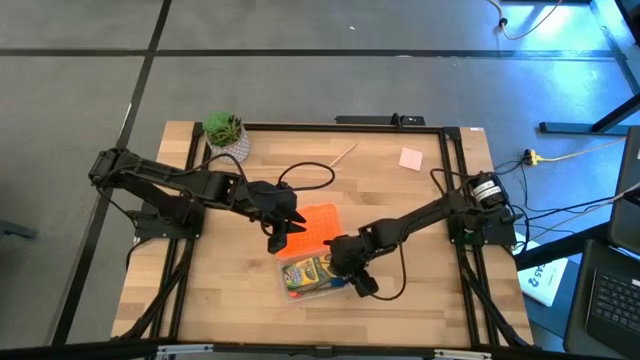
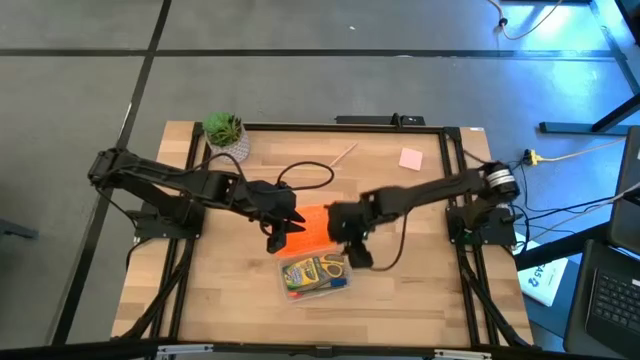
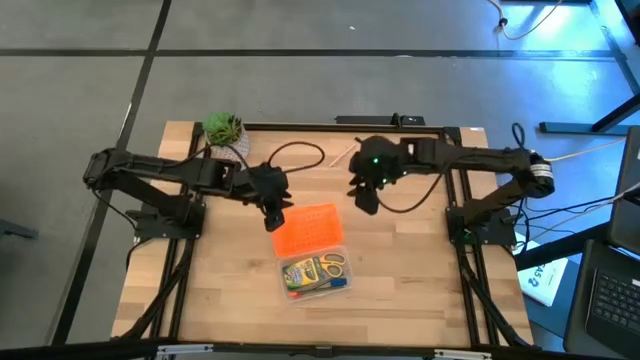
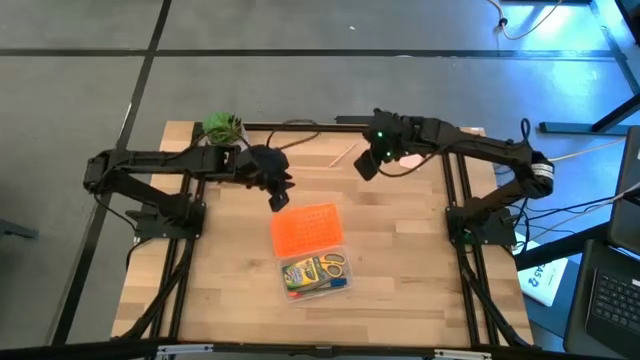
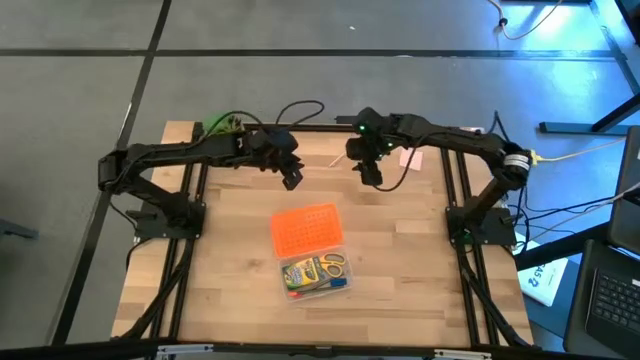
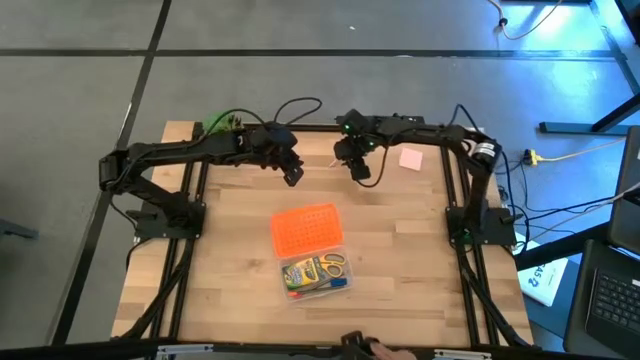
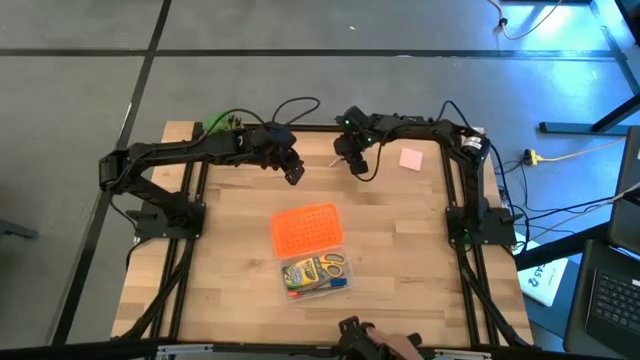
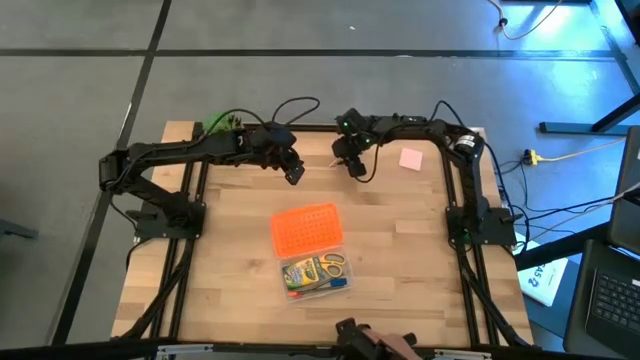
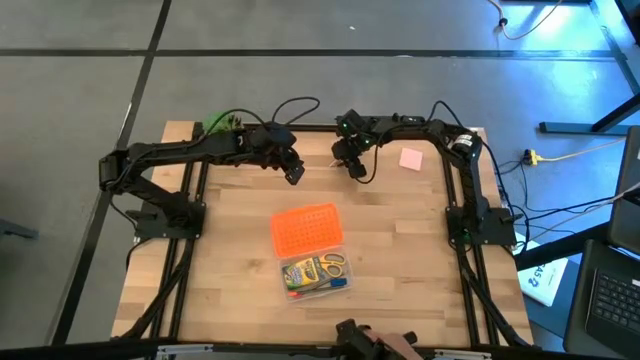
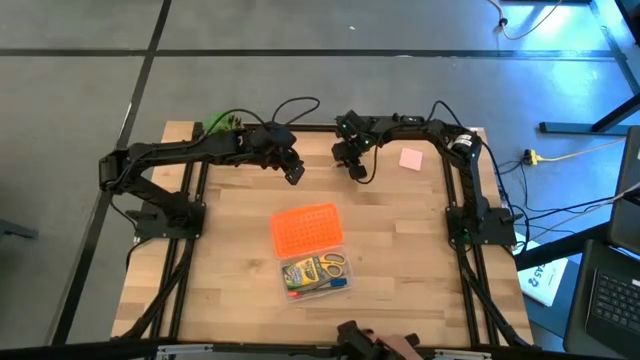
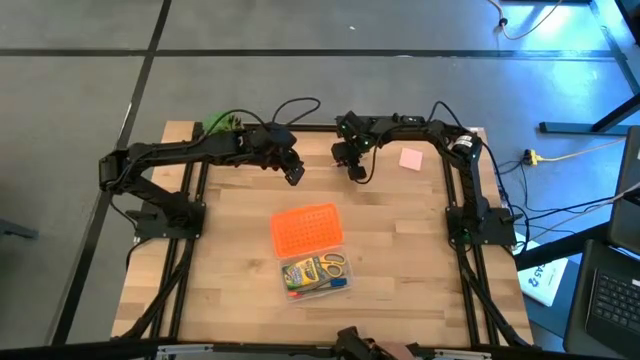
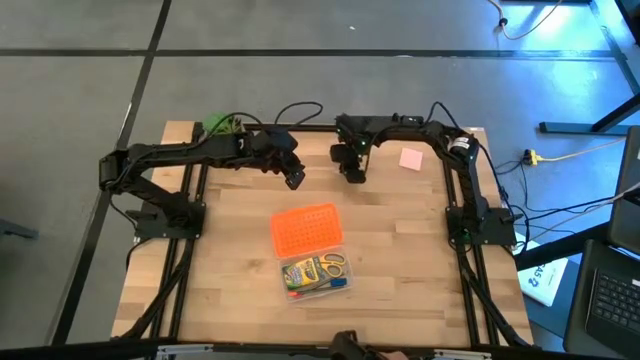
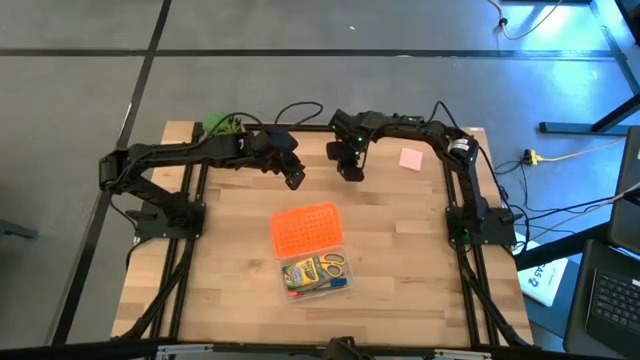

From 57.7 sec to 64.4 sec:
Task: Pack school essentials
Put the pink pen into the orange supply box

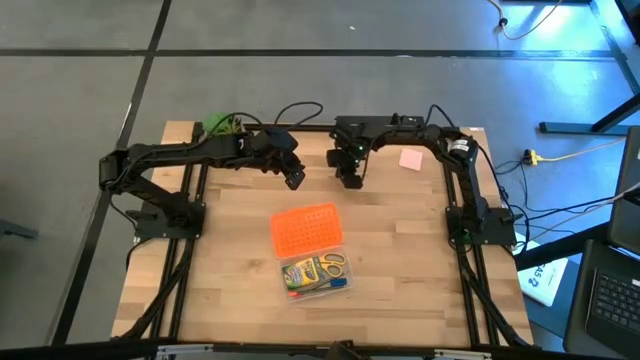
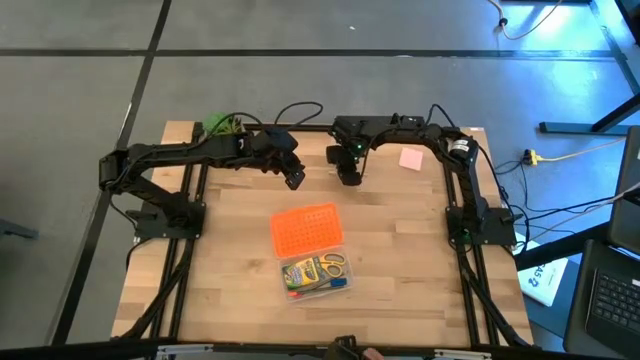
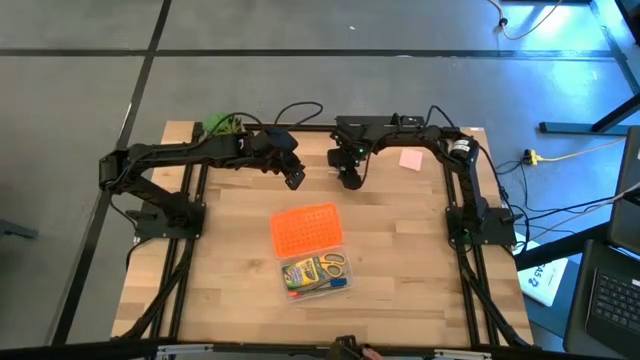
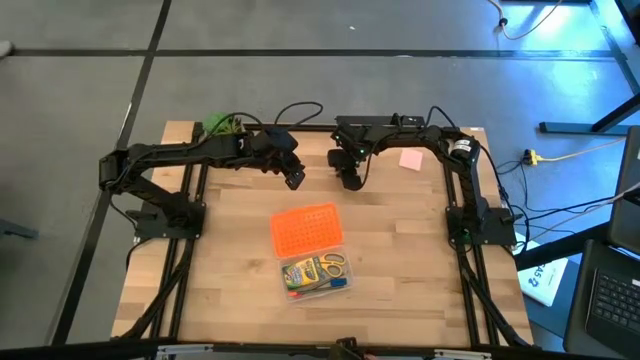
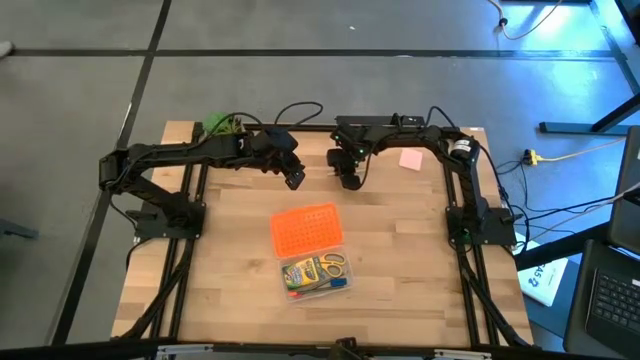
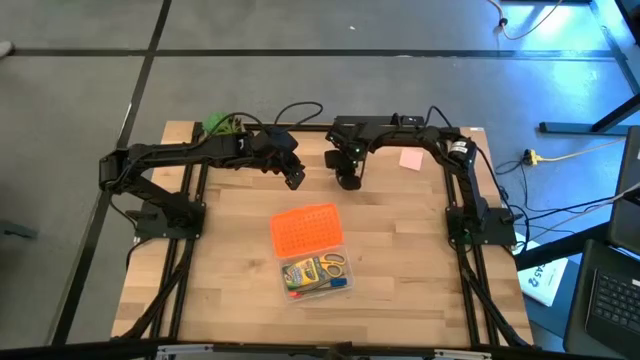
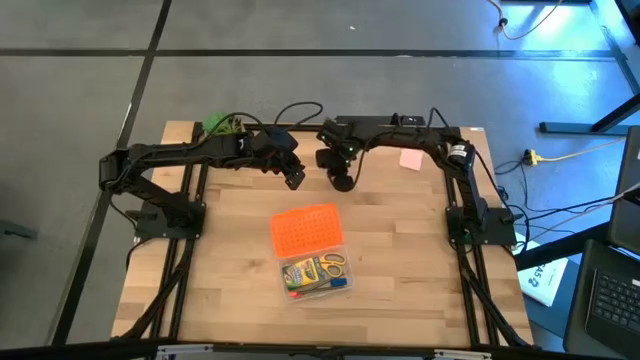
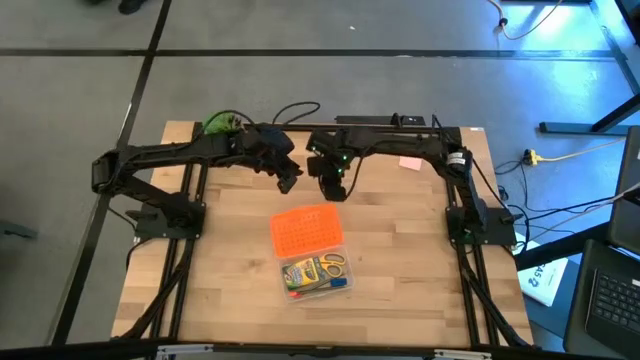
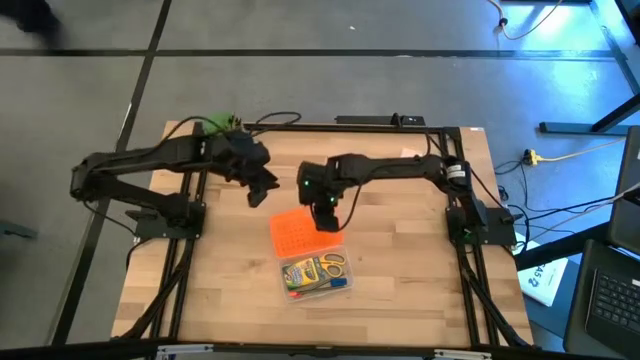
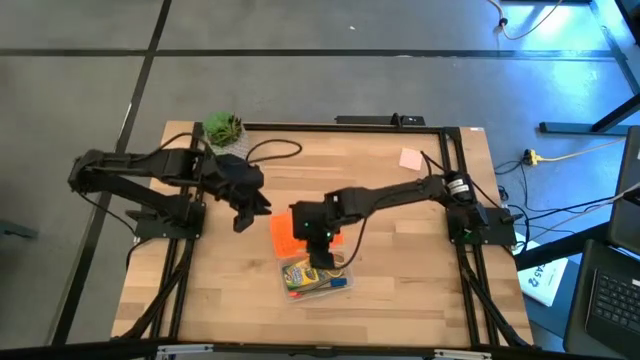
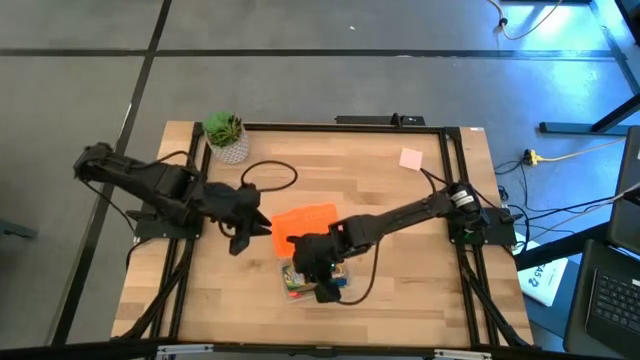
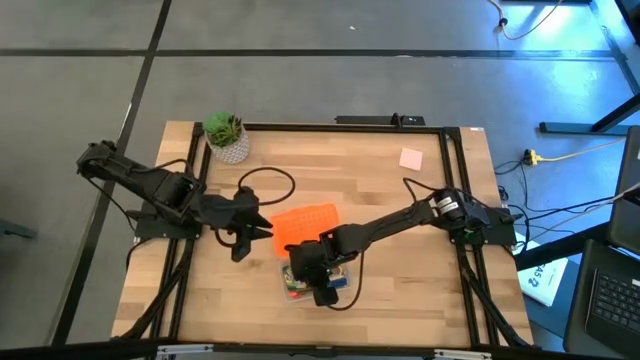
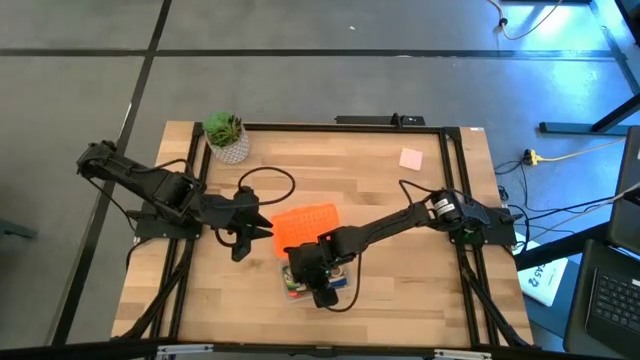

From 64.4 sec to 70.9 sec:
Put the pink pen into the orange supply box

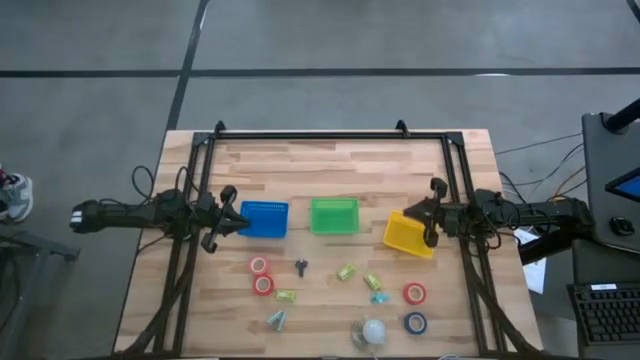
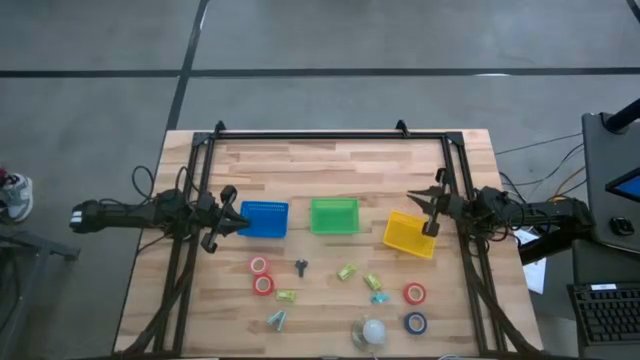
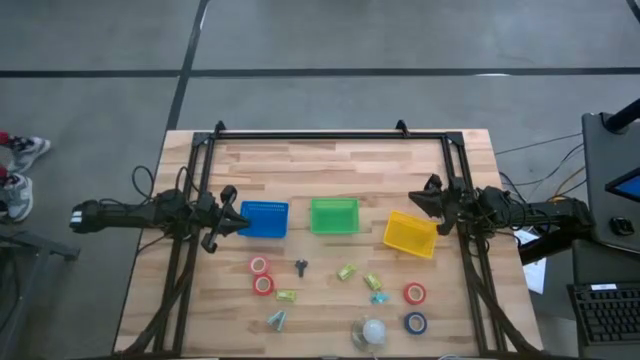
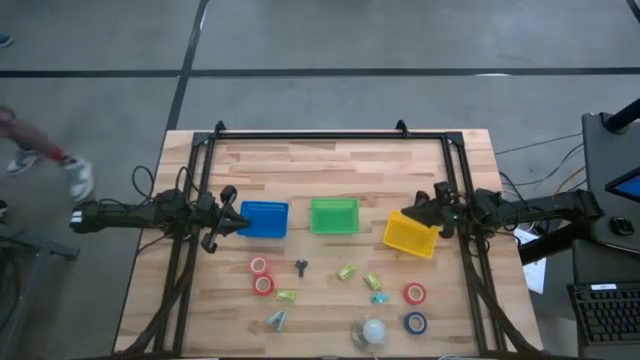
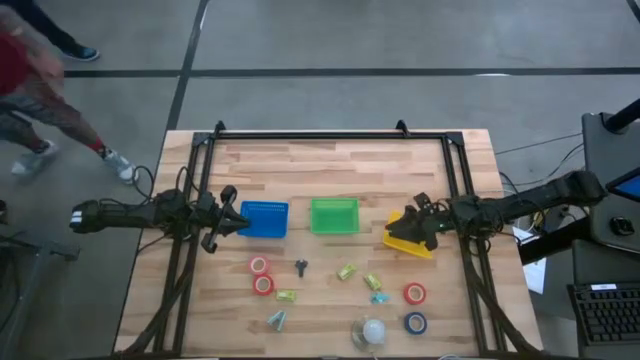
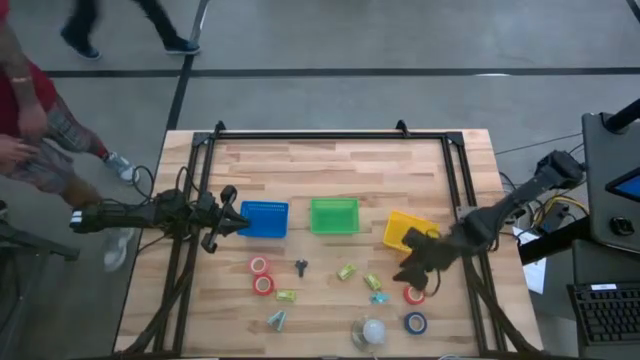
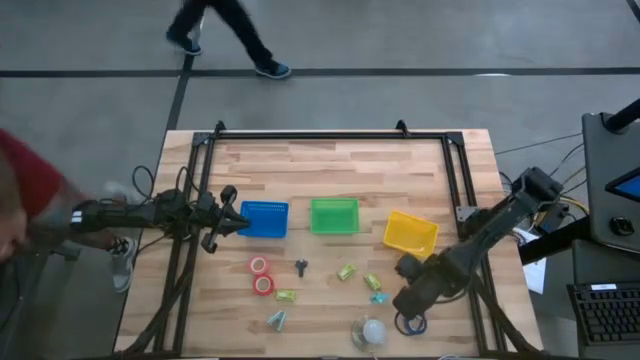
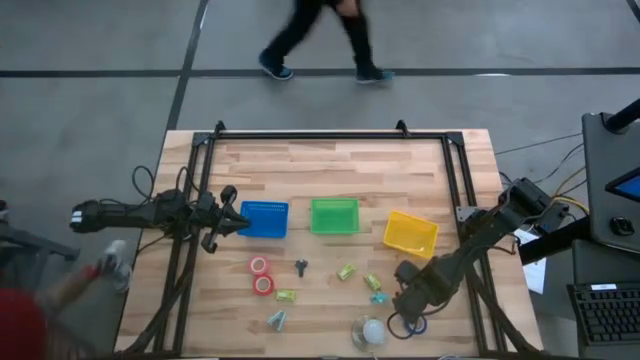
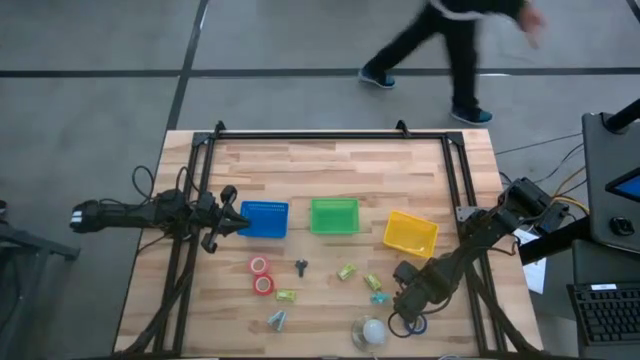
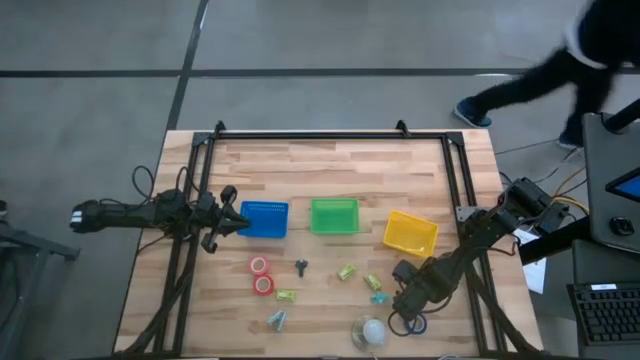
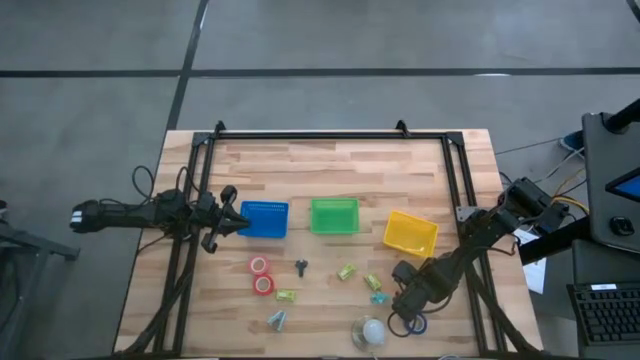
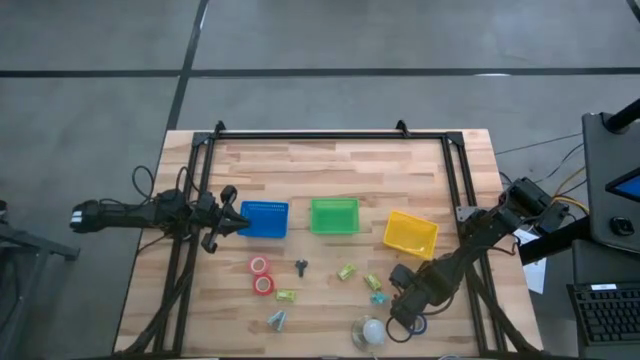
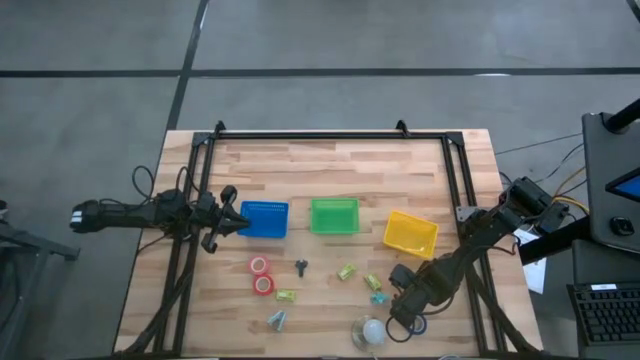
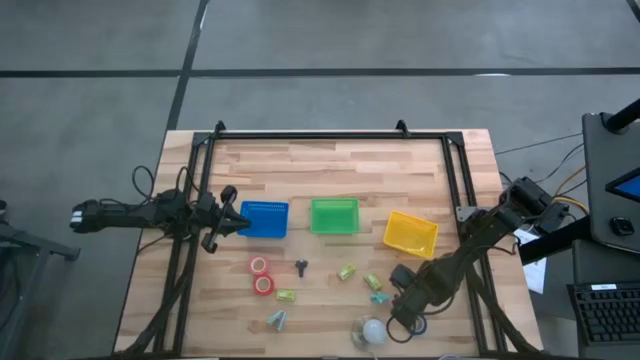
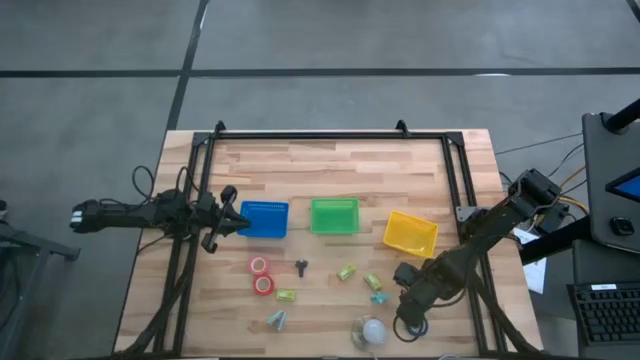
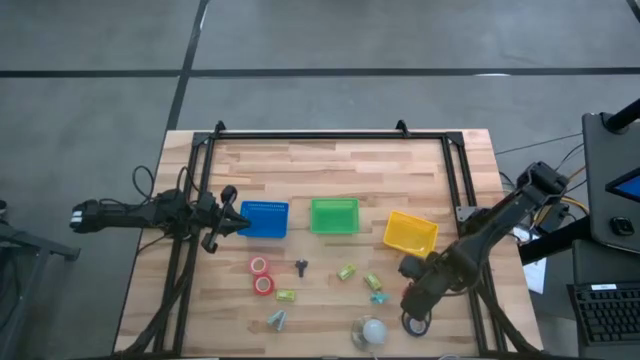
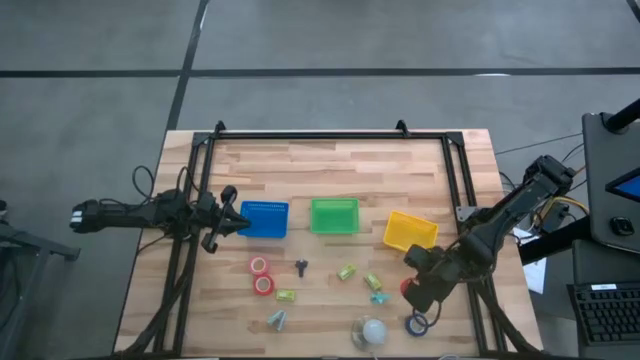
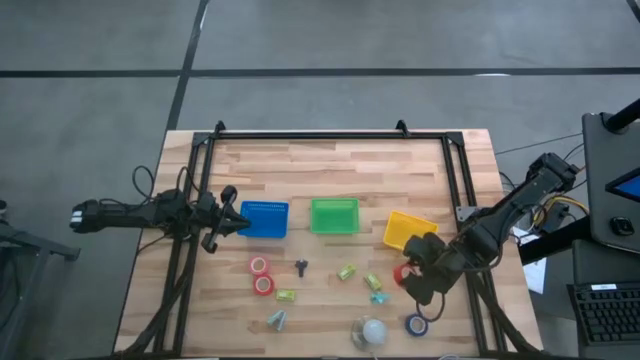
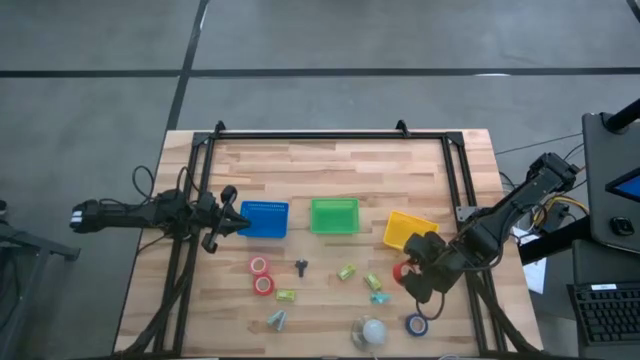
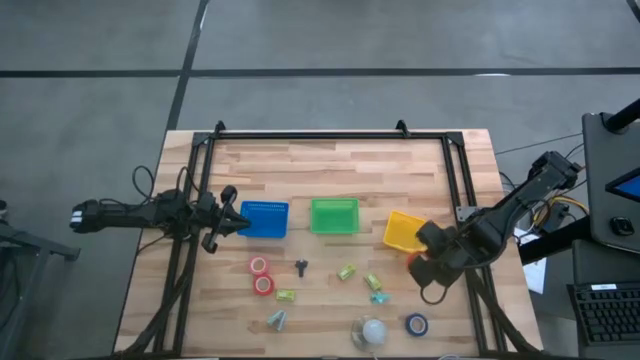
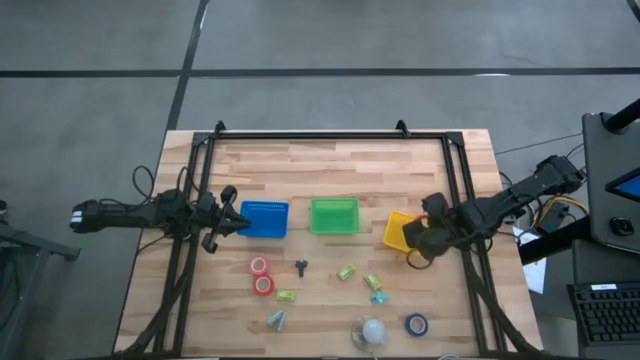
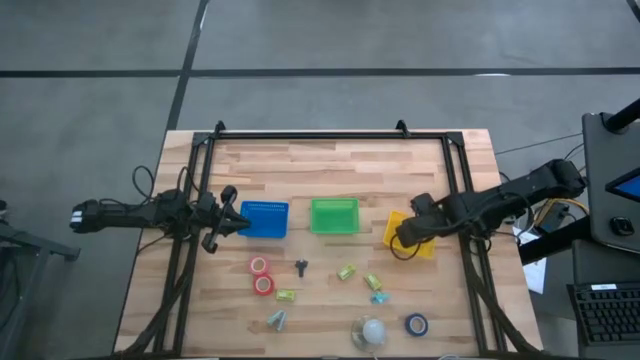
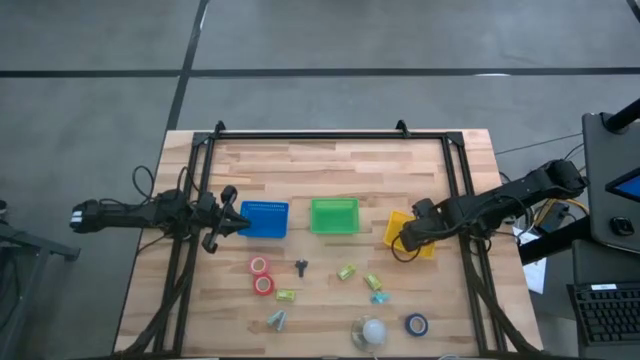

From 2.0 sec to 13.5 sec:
Task: Pick and place Stapler, Stapler remover, tape
Put the right orange tape into the yellow bin
